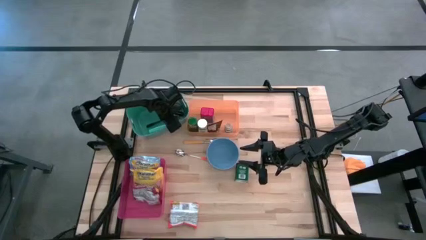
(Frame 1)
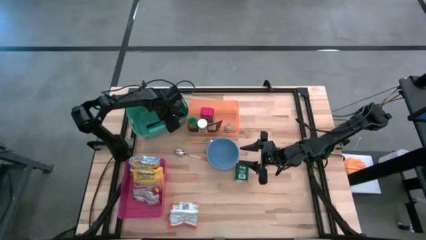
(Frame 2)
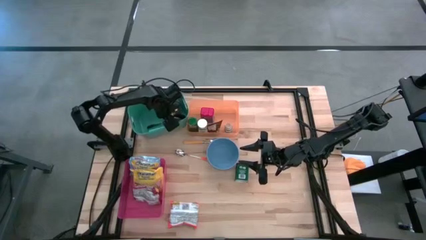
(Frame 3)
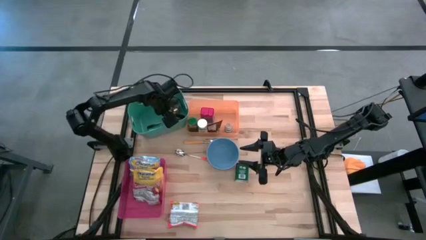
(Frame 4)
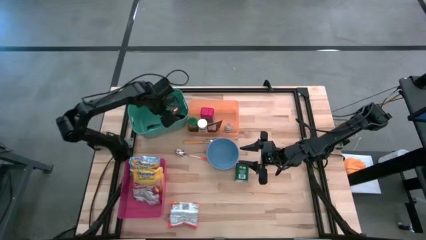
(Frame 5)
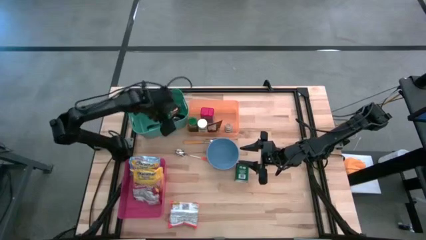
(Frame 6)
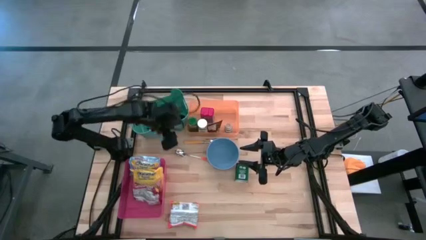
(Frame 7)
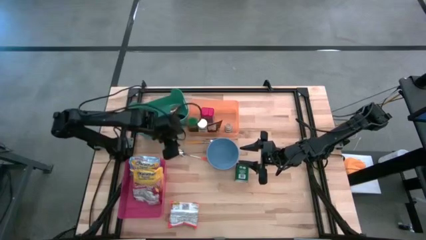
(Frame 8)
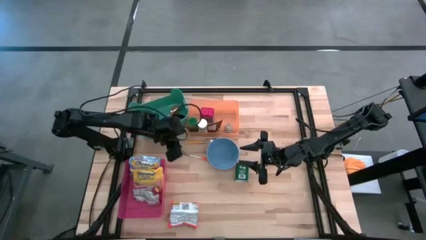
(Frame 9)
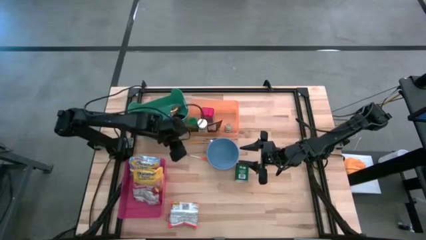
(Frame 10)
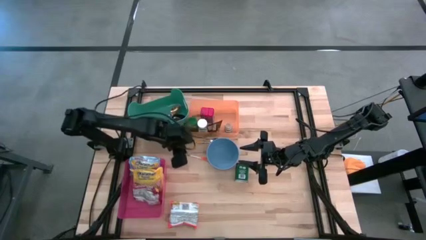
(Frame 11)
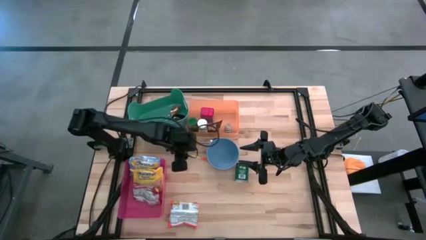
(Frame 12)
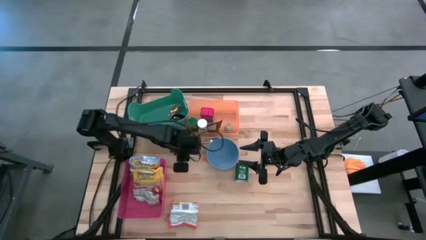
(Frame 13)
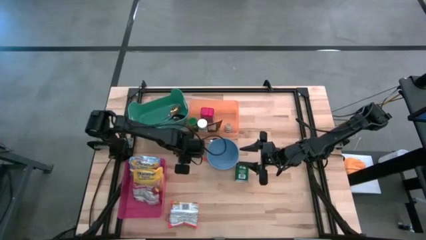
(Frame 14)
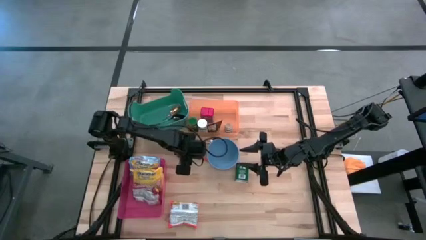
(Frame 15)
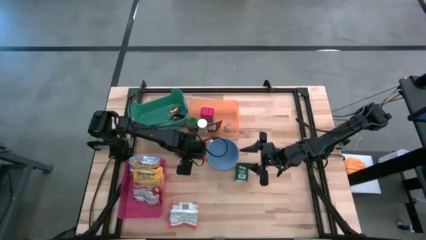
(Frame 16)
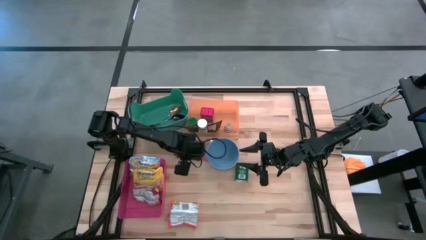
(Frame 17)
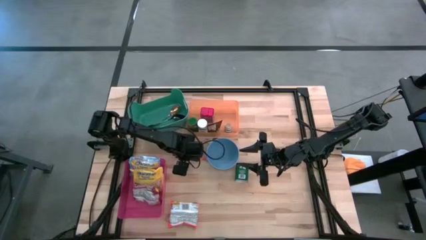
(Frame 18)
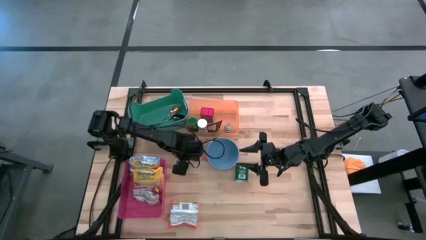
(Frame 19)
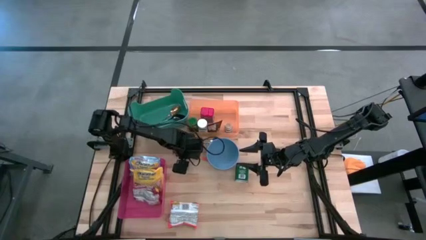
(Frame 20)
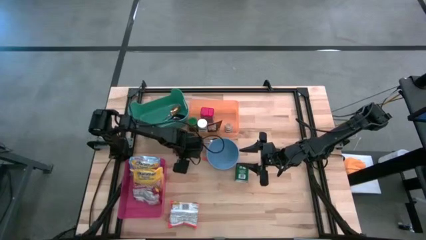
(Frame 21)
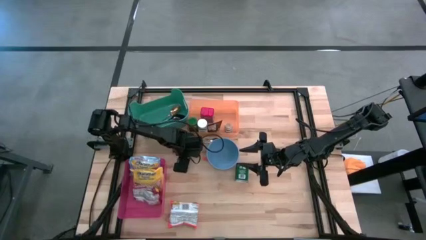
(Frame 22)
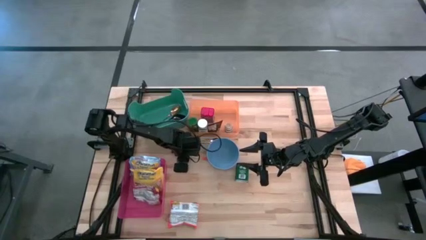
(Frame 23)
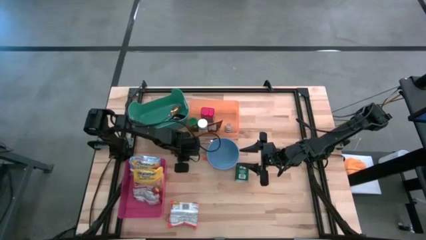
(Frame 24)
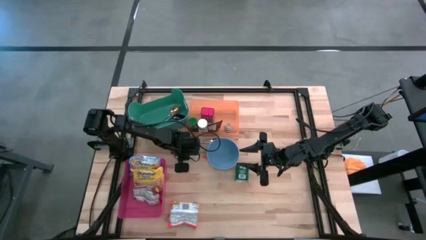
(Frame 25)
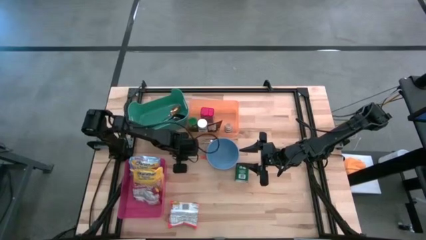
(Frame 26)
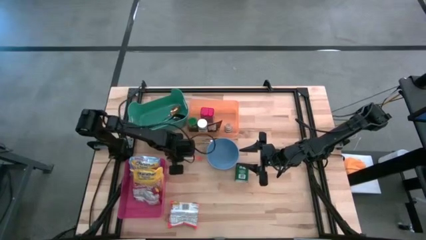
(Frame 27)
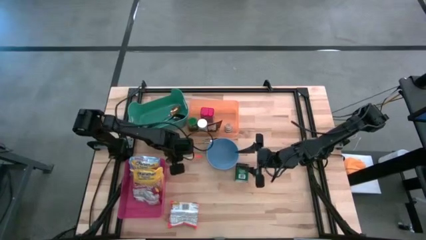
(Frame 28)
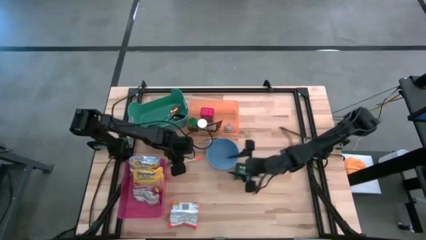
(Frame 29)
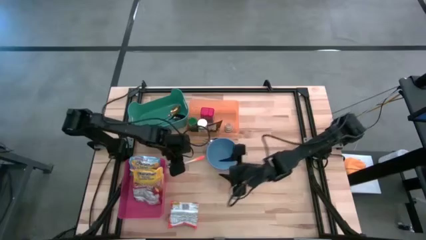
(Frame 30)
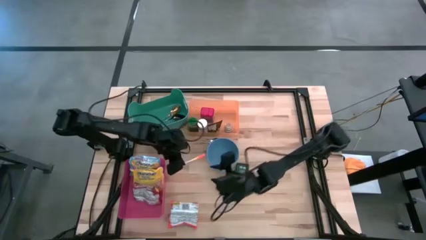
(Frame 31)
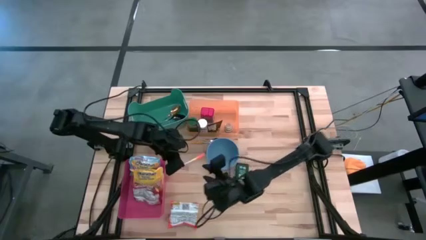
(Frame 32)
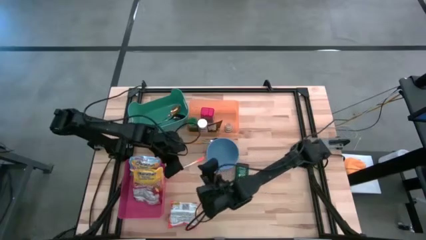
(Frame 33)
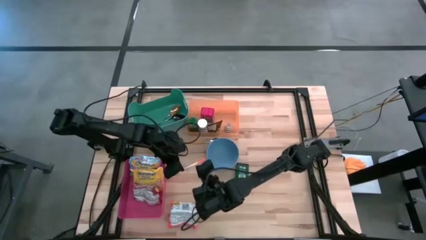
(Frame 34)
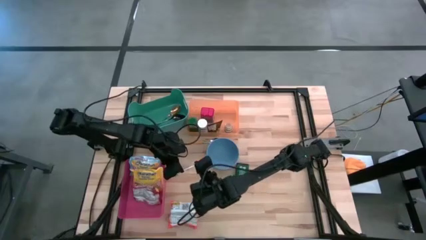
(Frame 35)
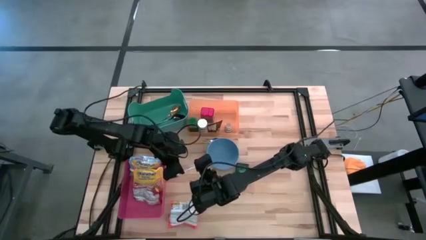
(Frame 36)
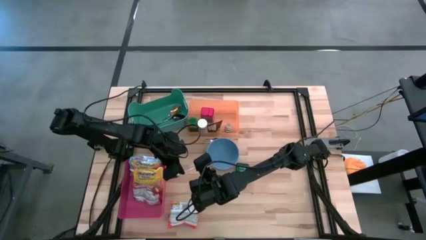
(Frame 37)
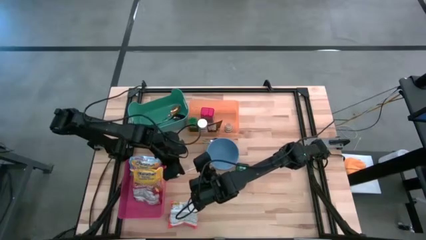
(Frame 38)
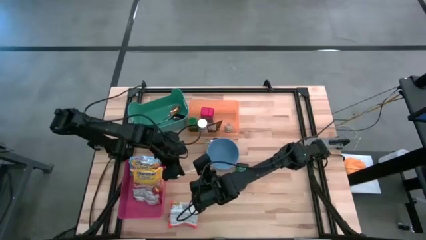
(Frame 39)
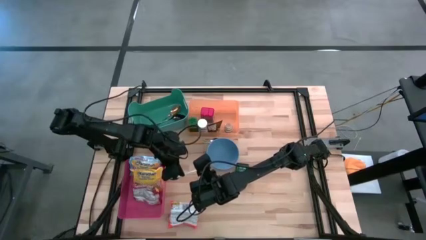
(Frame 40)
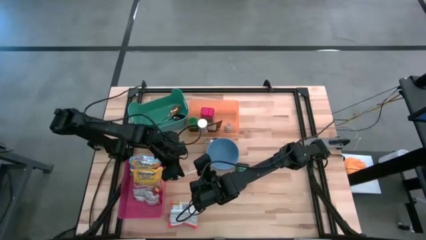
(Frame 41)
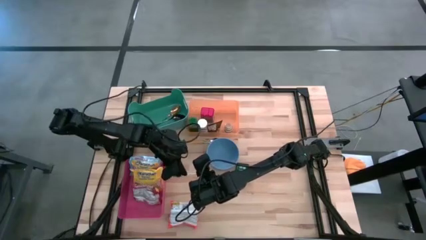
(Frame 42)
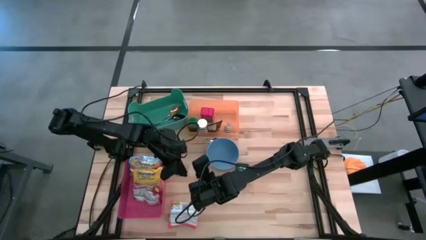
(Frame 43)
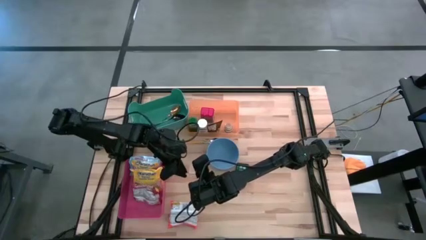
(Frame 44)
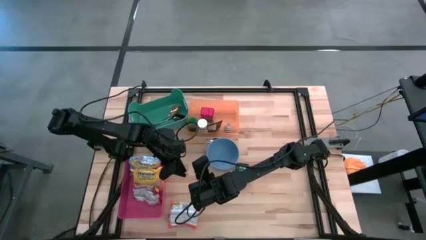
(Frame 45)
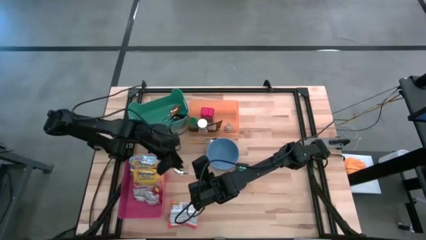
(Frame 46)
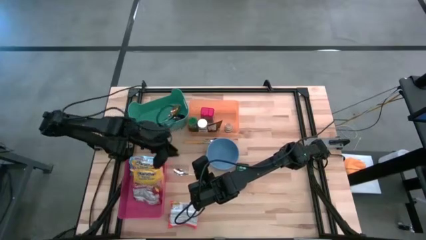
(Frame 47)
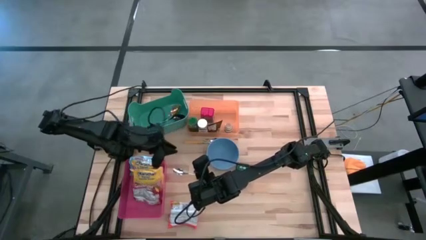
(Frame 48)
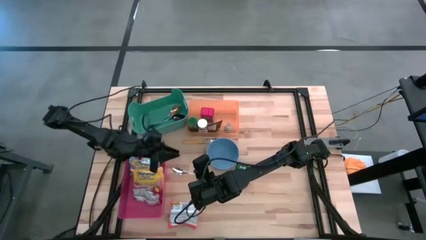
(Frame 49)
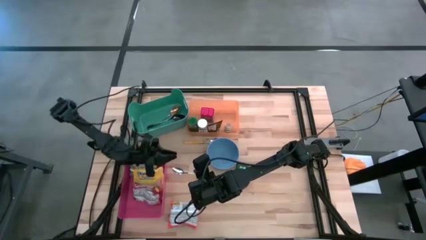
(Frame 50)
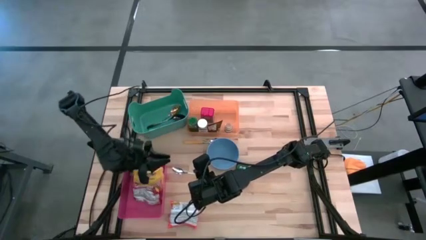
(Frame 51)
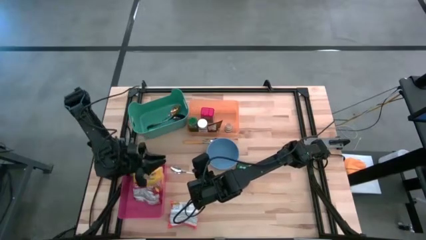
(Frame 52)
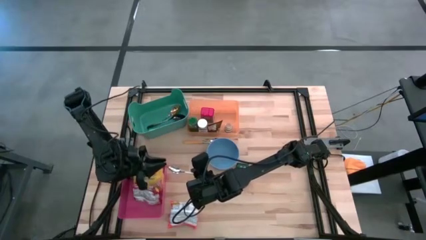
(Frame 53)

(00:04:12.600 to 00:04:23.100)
Put the orange spoon into the green bin
